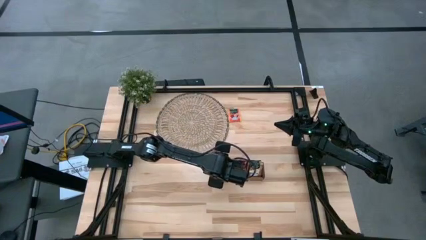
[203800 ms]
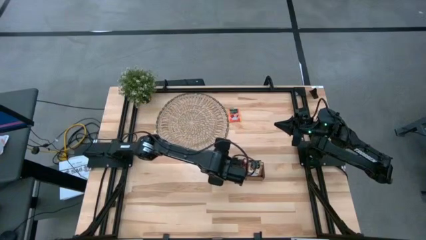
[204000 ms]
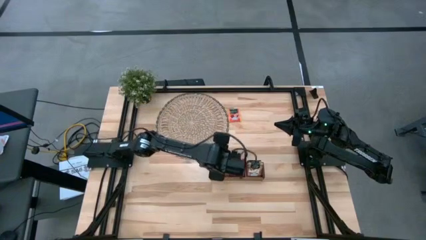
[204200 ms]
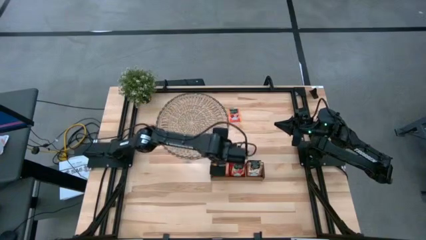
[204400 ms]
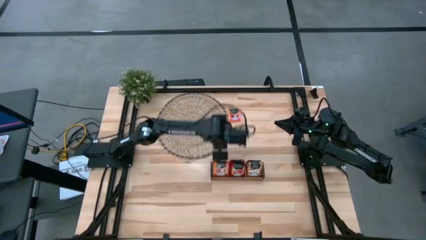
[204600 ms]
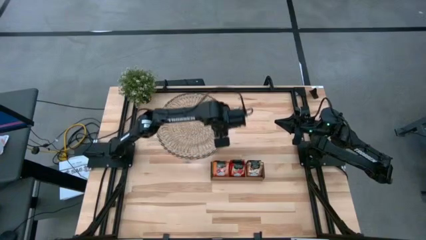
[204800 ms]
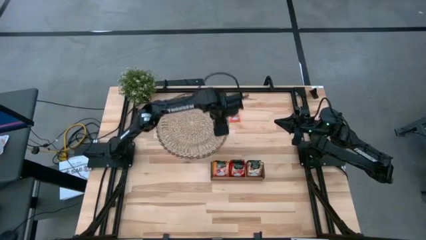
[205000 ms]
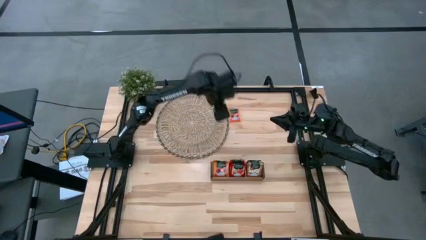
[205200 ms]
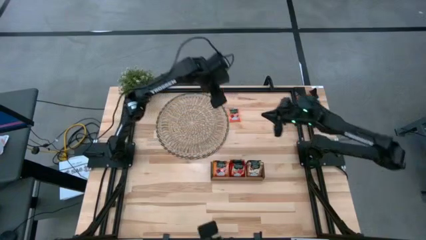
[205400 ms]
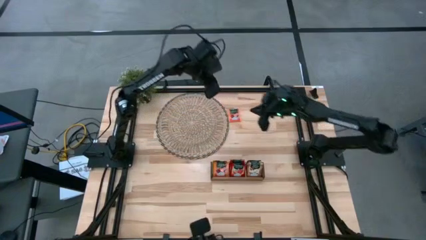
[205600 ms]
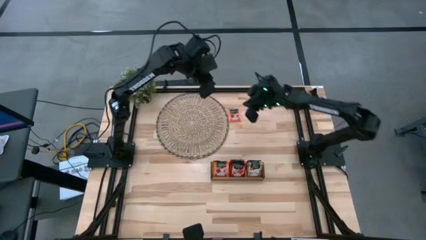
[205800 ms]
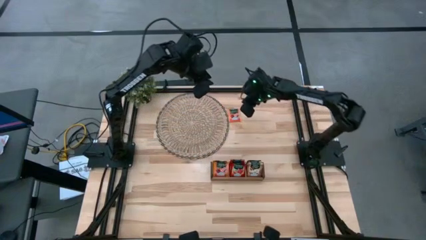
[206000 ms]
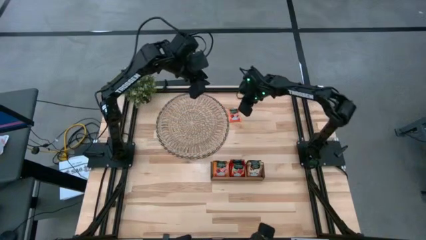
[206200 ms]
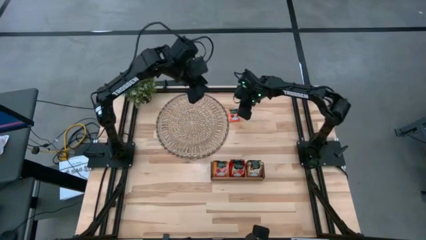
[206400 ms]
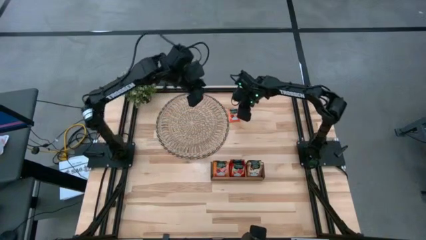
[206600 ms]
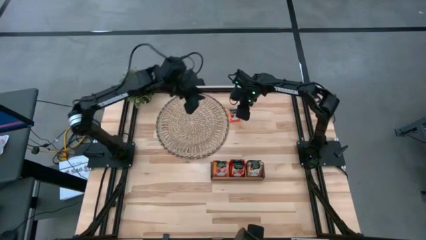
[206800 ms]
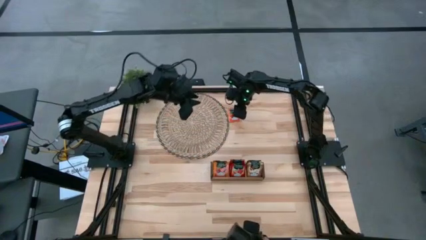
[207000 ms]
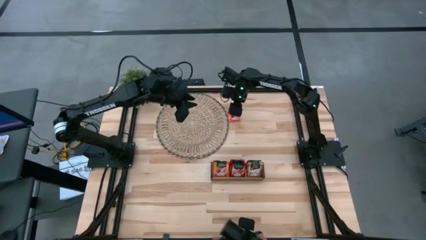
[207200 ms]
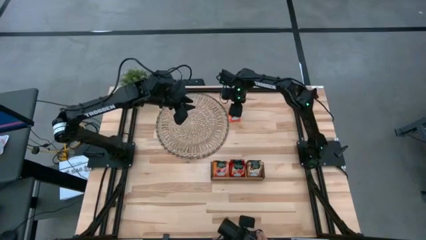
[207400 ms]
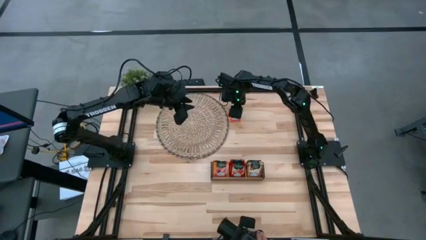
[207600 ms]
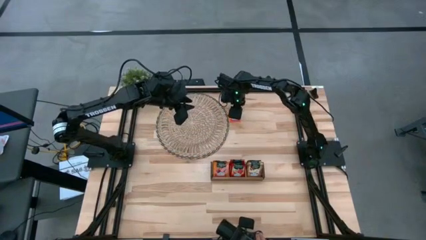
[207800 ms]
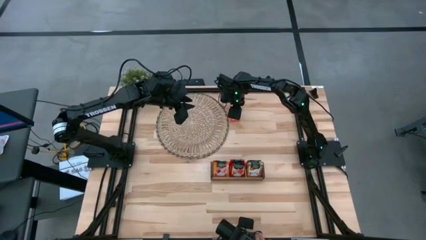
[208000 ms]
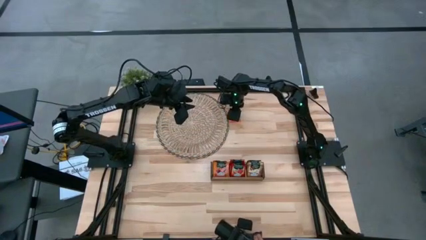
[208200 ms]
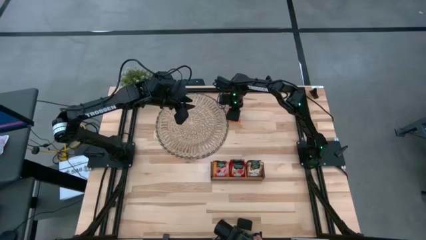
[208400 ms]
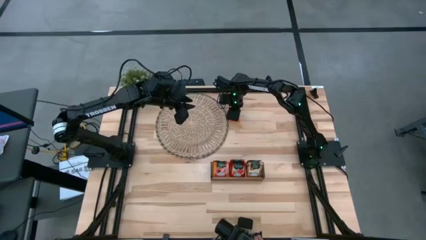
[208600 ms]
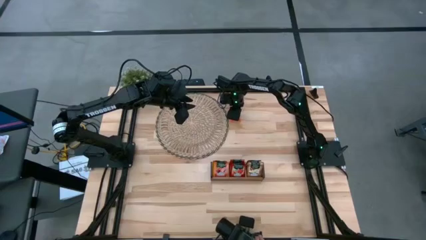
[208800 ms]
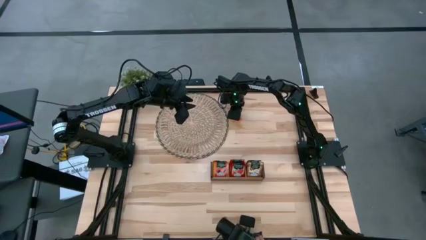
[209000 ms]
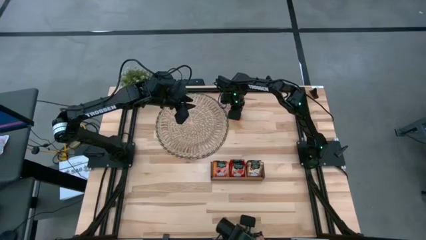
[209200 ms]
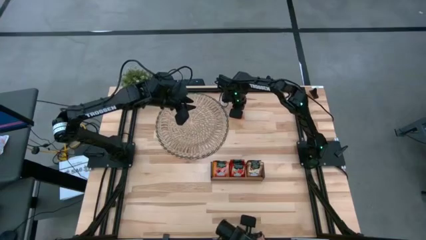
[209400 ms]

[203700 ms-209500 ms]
Task: Pick & Place Tea
Put the orange tea bag into the left slot of the wooden organizer

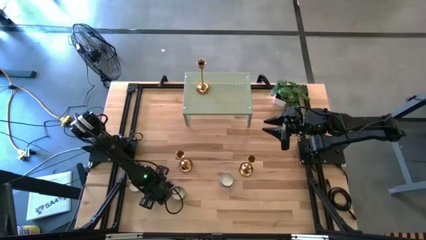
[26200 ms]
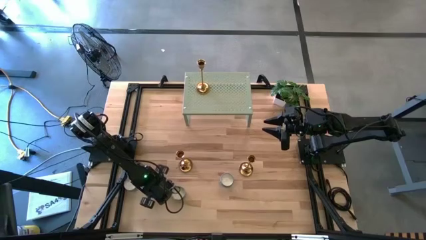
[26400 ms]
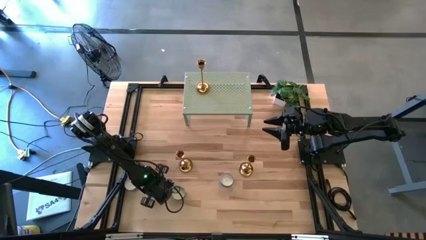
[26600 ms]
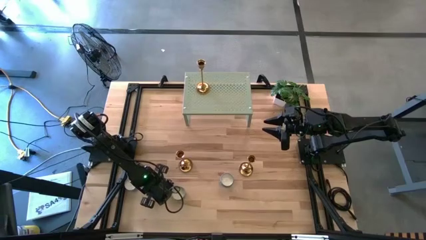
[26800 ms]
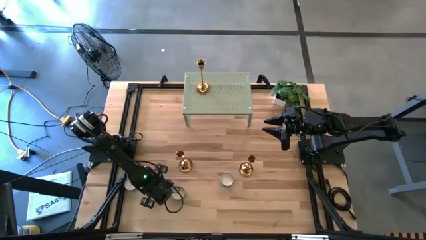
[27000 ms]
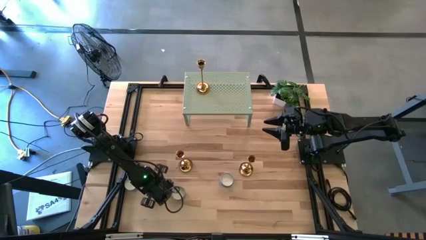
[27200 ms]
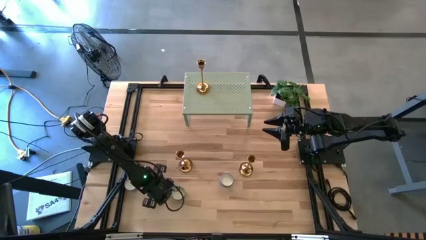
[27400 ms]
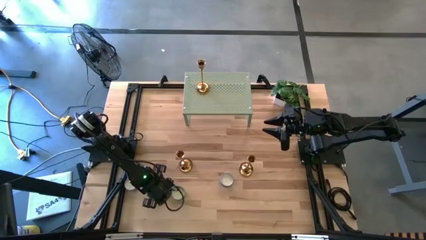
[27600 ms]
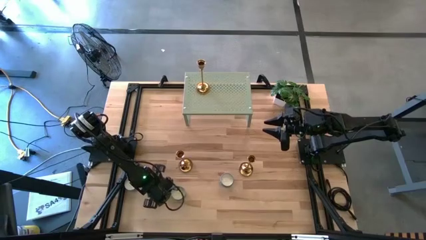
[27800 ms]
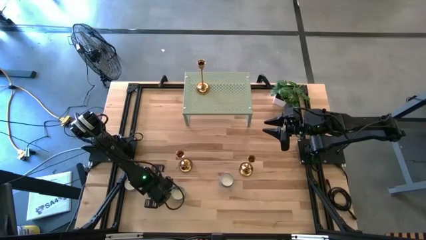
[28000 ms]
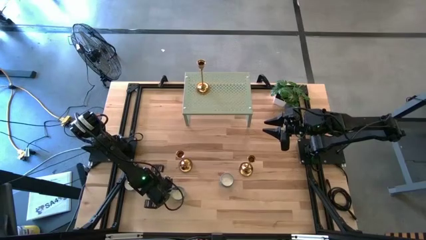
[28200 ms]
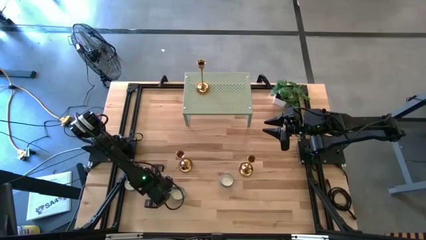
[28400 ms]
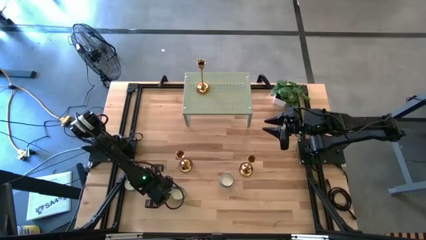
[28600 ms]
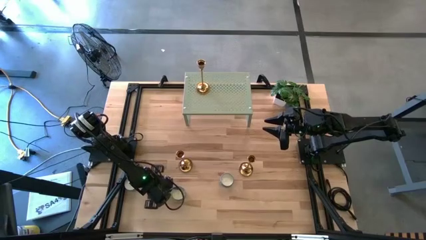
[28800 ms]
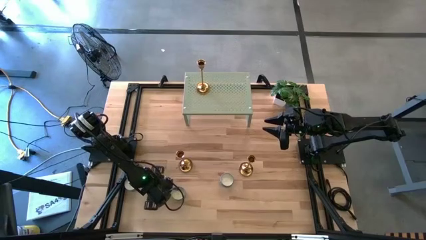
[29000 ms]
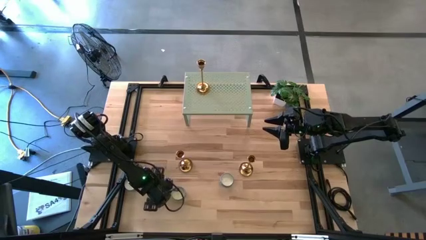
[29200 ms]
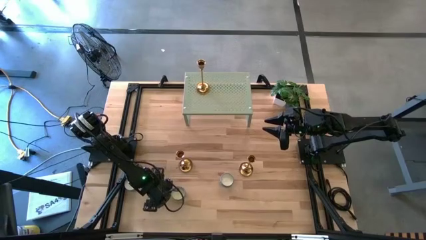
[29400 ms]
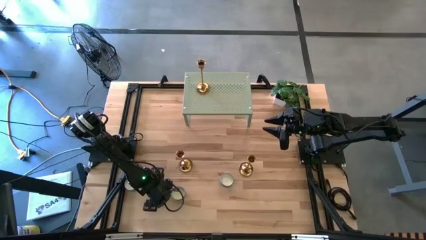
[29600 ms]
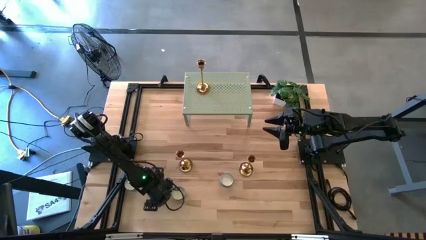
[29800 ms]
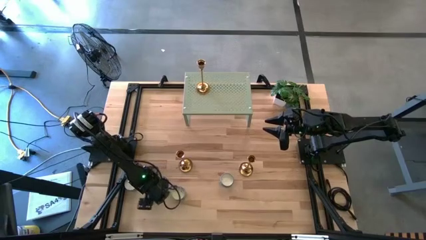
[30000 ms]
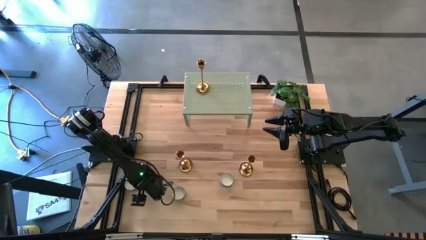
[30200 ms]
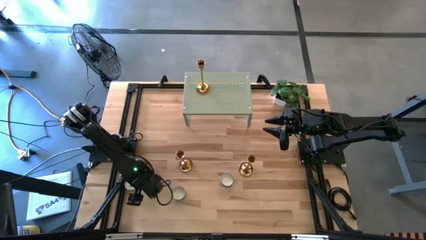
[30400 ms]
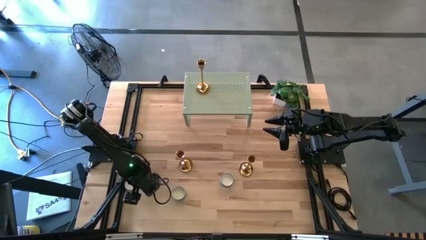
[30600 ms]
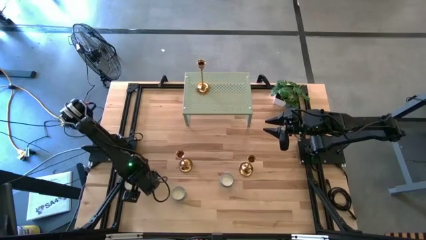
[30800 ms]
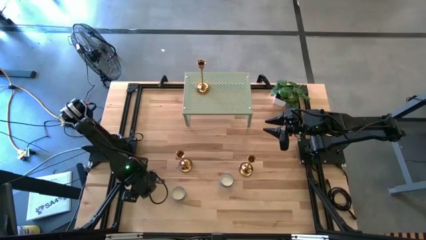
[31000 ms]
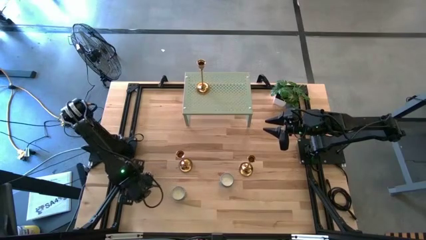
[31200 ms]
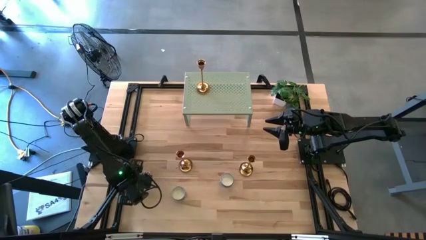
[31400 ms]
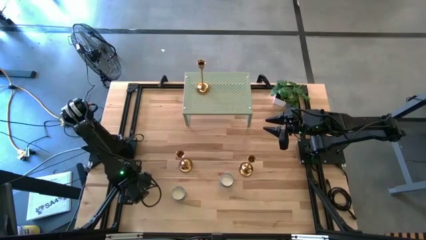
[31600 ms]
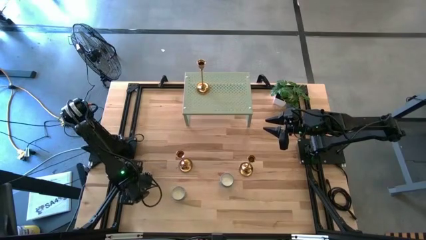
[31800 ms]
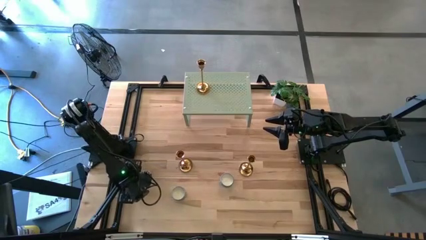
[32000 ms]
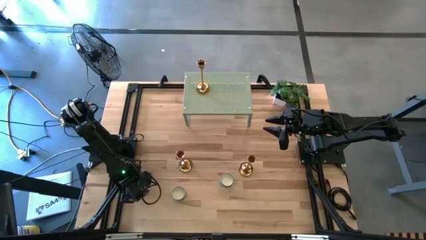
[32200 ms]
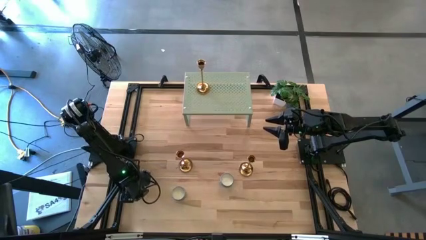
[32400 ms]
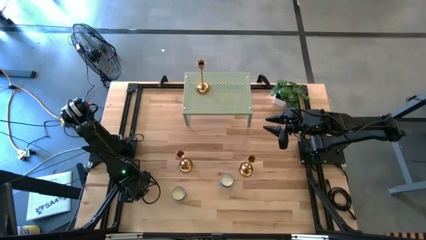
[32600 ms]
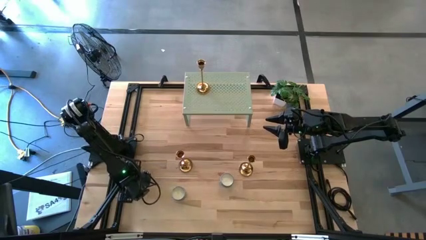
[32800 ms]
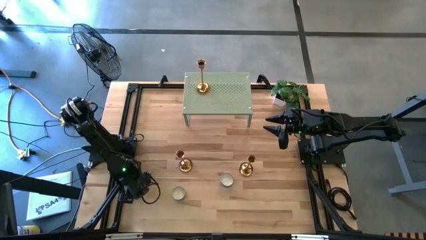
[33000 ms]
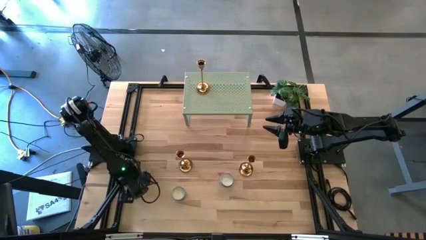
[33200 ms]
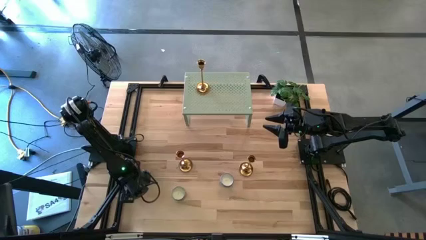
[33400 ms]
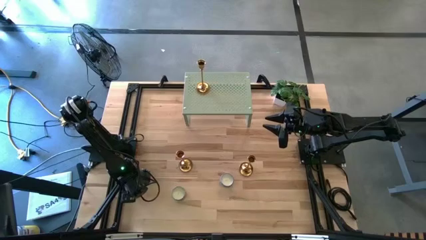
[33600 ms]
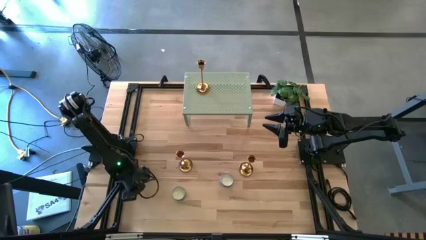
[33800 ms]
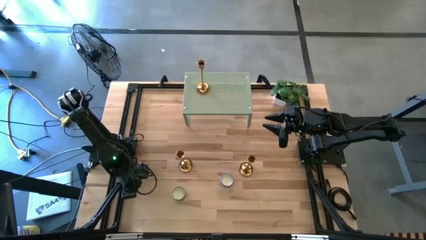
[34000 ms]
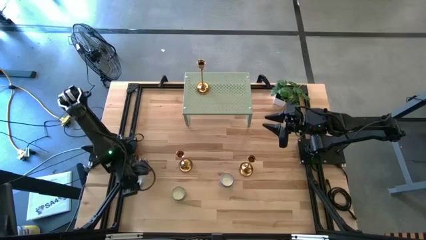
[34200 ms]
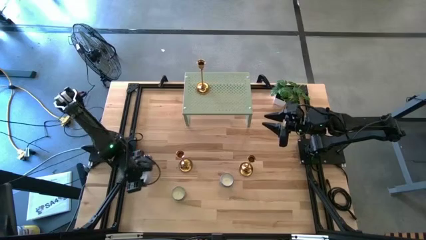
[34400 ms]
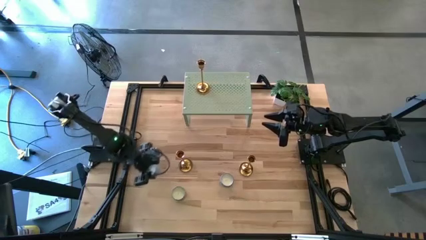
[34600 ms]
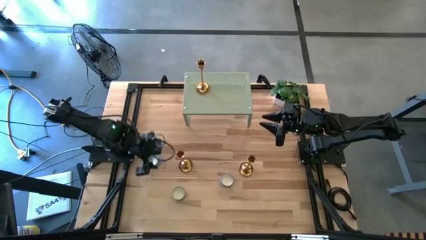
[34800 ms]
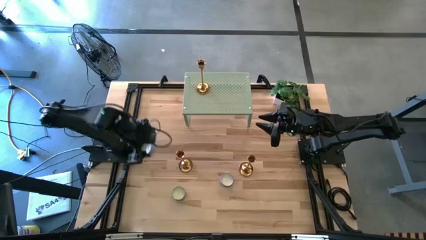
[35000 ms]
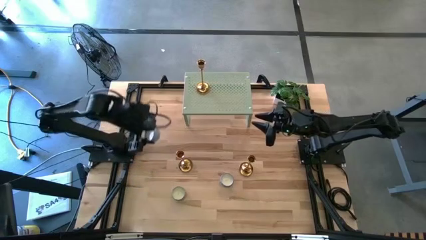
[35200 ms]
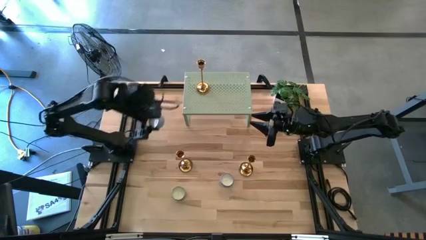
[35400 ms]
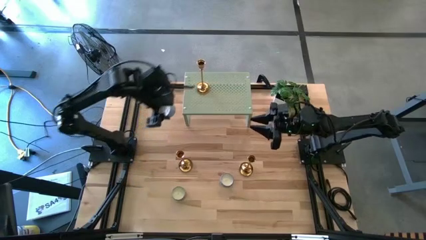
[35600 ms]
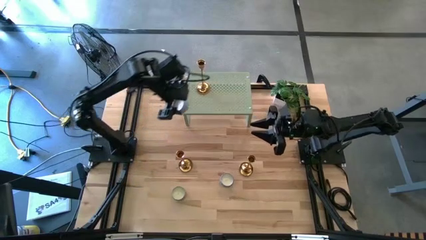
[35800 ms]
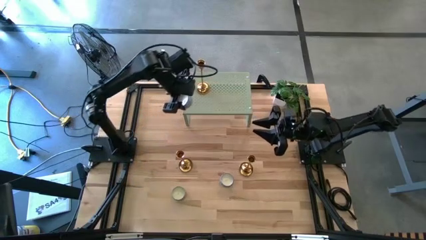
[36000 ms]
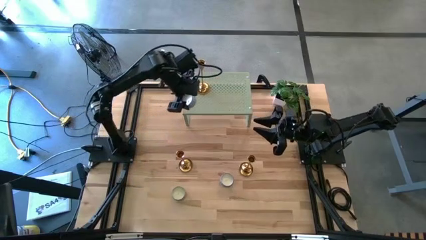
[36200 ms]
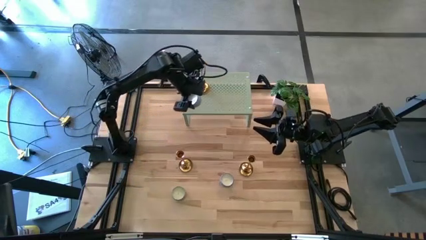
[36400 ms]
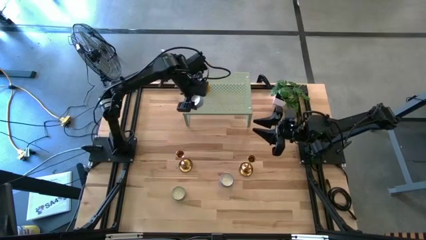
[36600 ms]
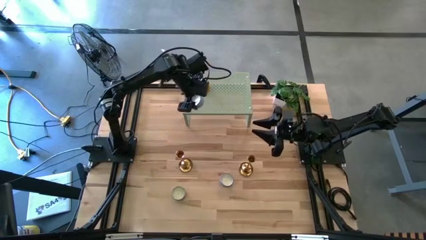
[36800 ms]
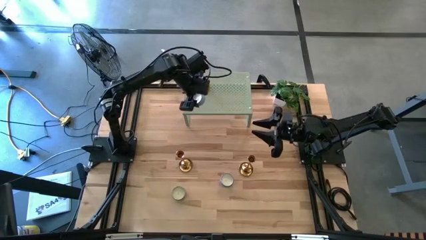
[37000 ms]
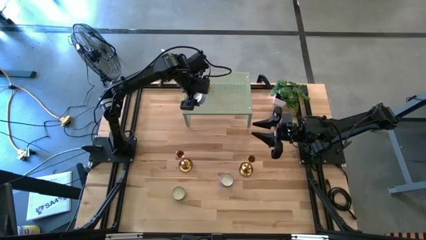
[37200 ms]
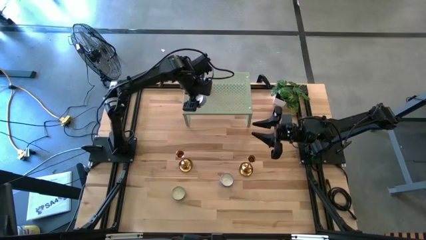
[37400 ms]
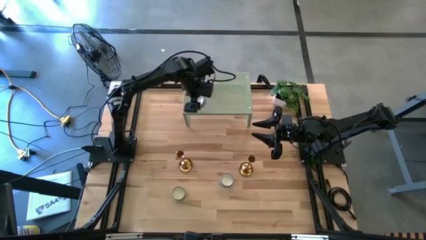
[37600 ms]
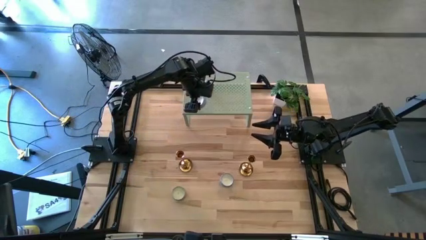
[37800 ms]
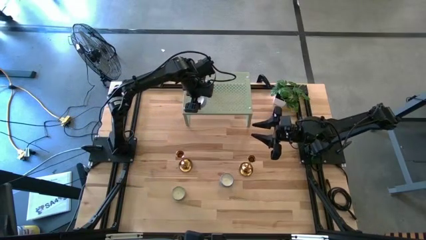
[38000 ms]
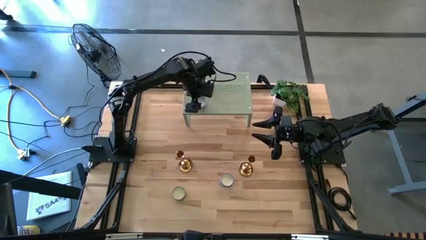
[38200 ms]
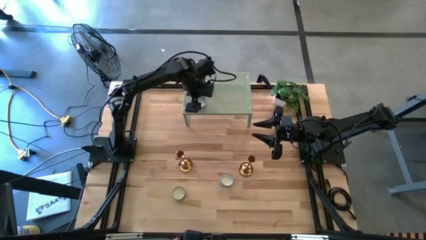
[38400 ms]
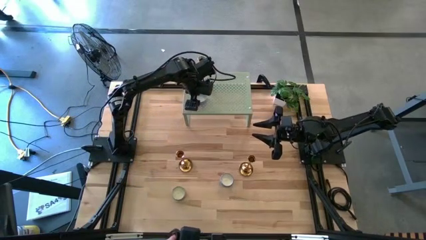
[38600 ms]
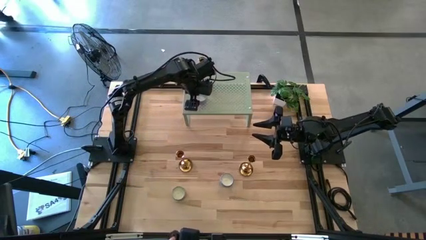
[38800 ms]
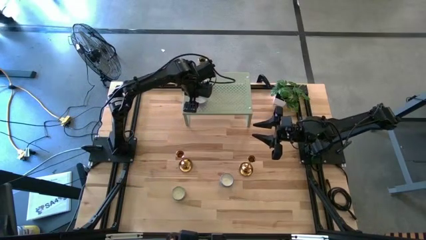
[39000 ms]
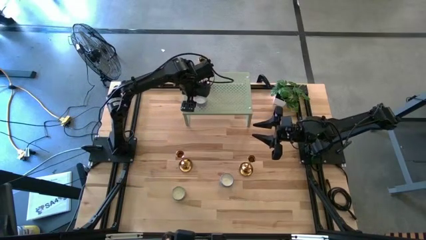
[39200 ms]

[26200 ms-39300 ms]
Task: Pick & Place candle stick holders
Put the left blue scented candle on the shelf
